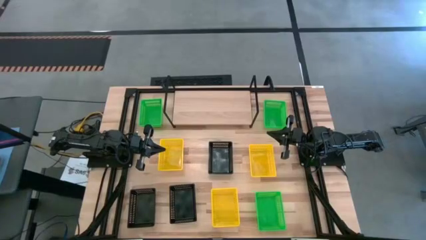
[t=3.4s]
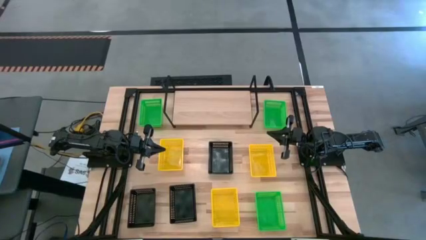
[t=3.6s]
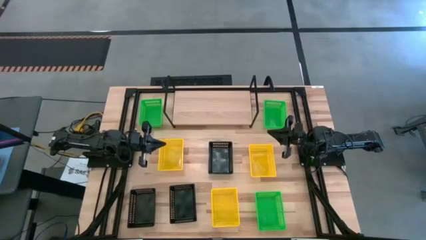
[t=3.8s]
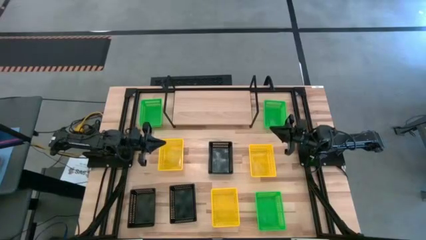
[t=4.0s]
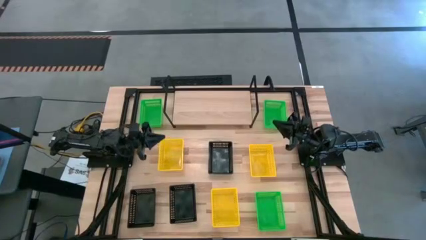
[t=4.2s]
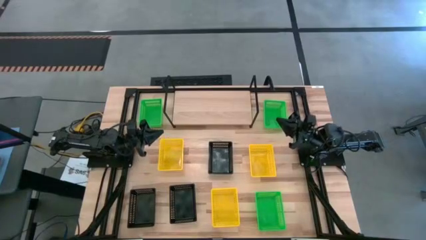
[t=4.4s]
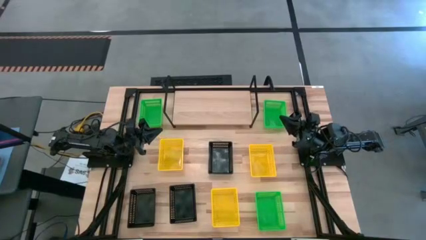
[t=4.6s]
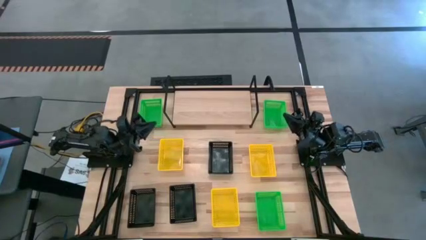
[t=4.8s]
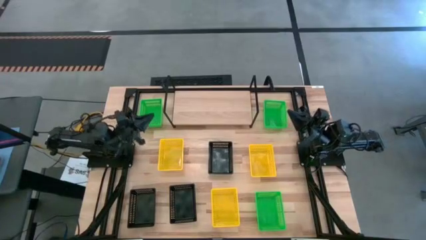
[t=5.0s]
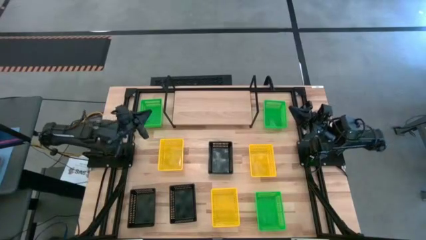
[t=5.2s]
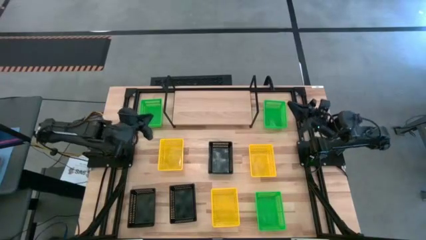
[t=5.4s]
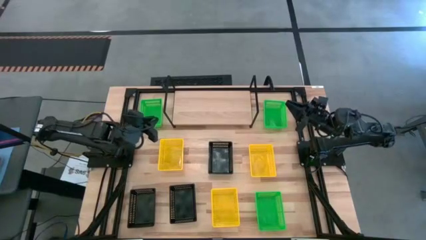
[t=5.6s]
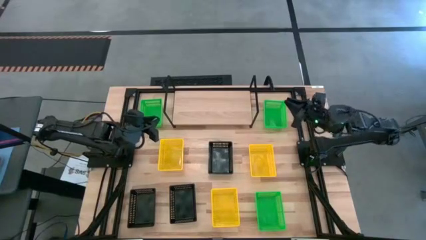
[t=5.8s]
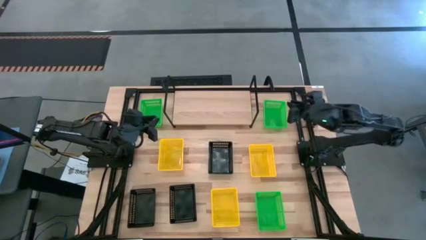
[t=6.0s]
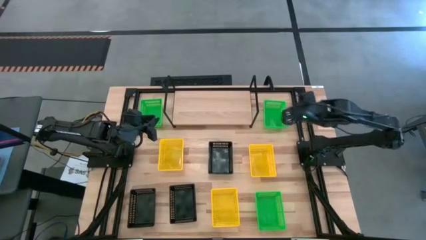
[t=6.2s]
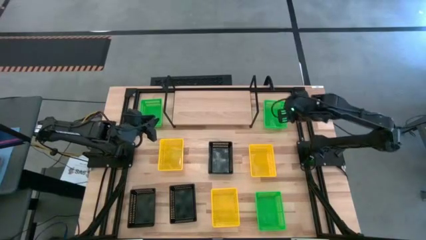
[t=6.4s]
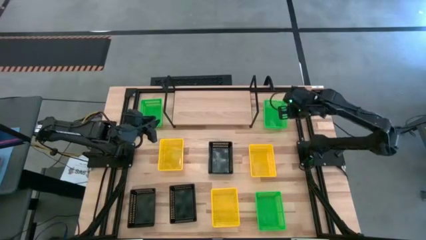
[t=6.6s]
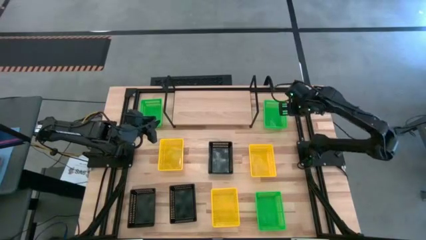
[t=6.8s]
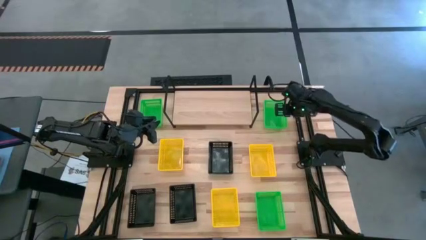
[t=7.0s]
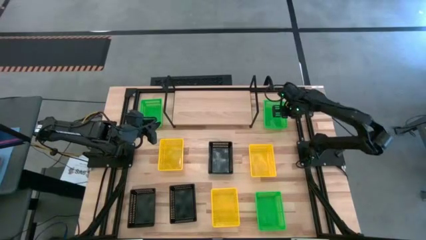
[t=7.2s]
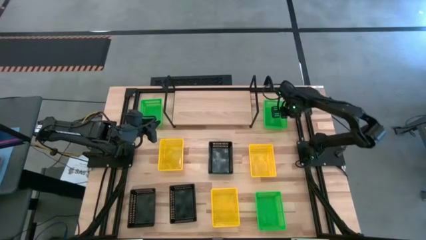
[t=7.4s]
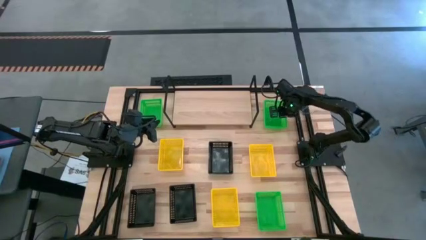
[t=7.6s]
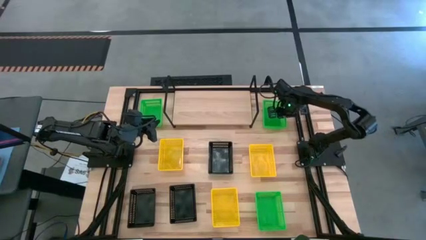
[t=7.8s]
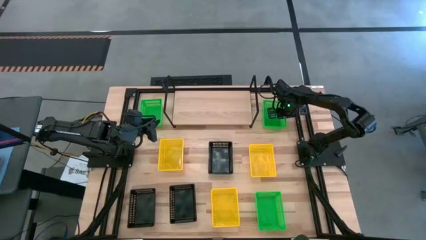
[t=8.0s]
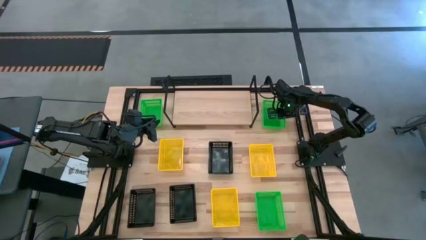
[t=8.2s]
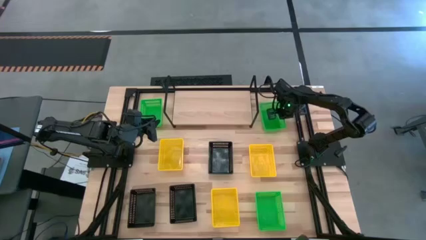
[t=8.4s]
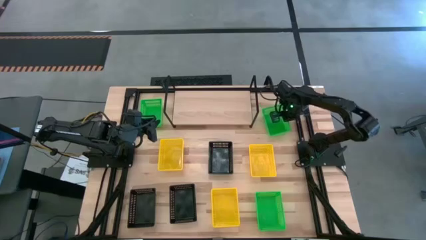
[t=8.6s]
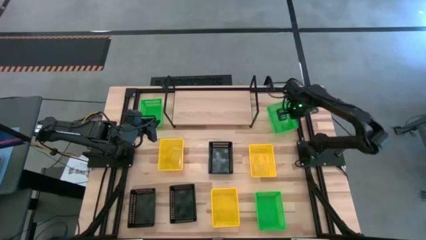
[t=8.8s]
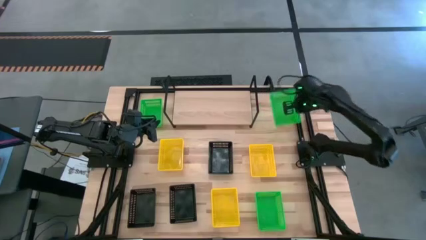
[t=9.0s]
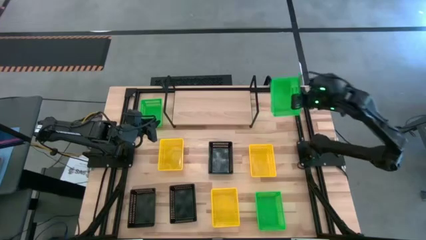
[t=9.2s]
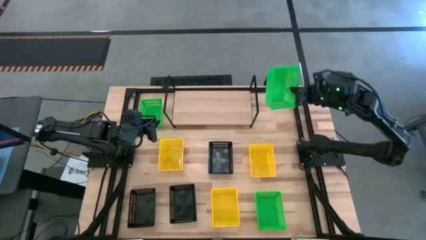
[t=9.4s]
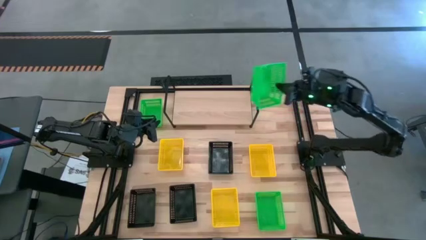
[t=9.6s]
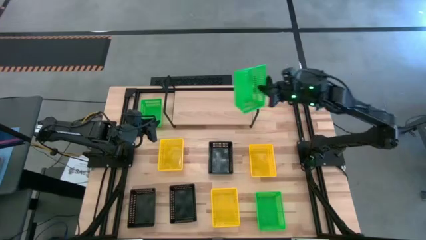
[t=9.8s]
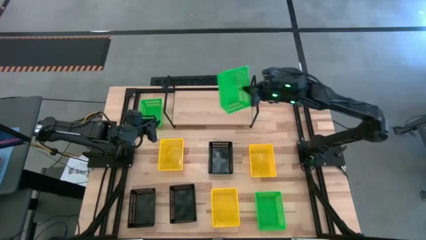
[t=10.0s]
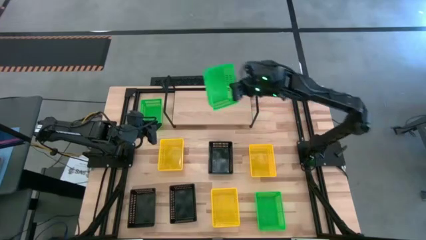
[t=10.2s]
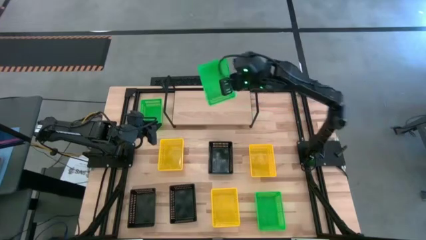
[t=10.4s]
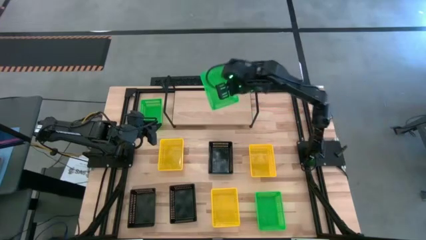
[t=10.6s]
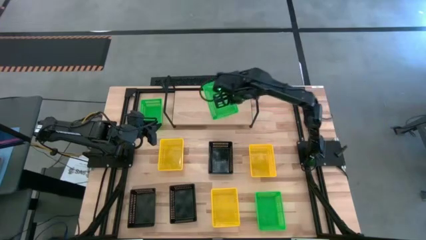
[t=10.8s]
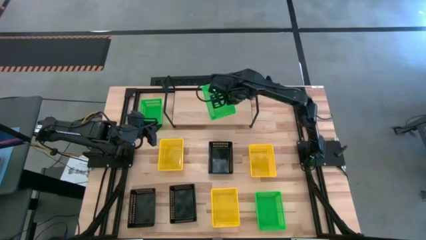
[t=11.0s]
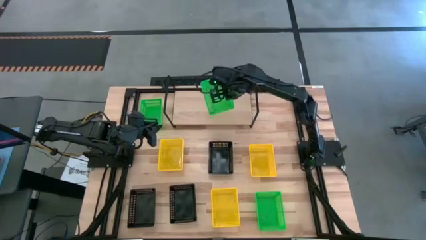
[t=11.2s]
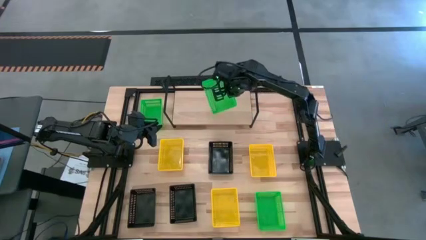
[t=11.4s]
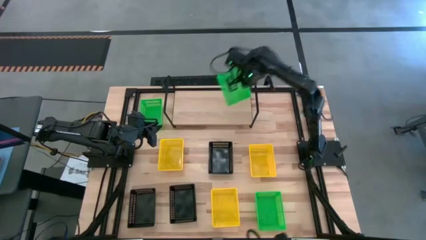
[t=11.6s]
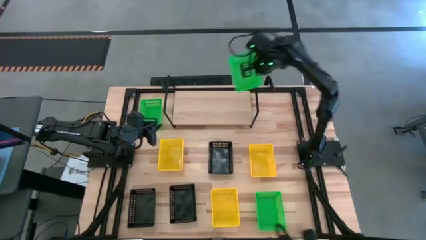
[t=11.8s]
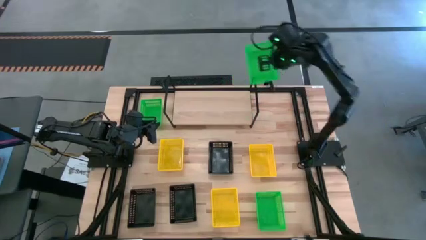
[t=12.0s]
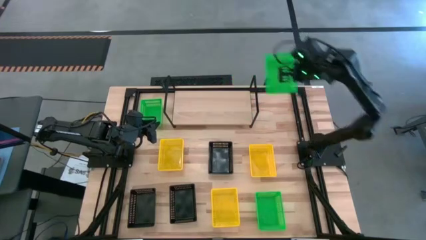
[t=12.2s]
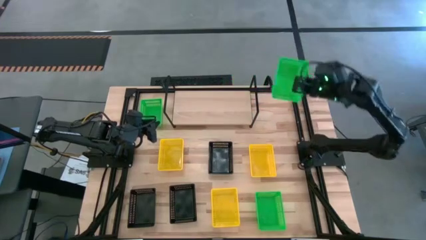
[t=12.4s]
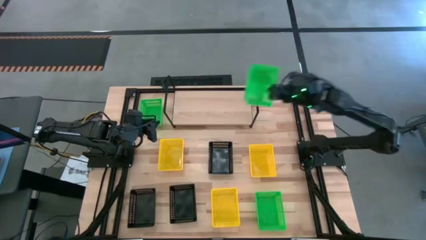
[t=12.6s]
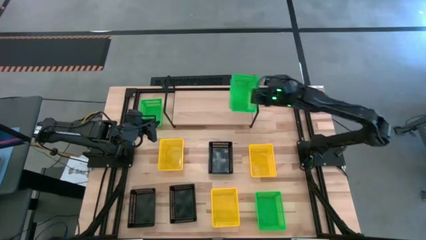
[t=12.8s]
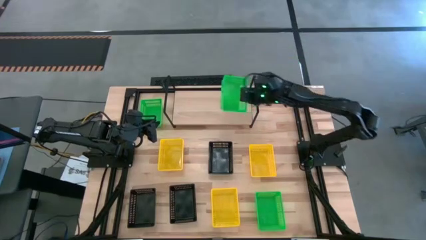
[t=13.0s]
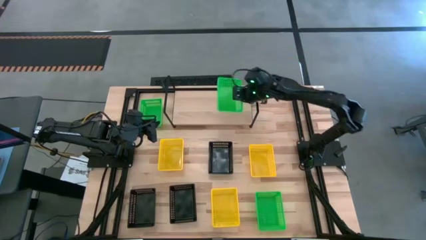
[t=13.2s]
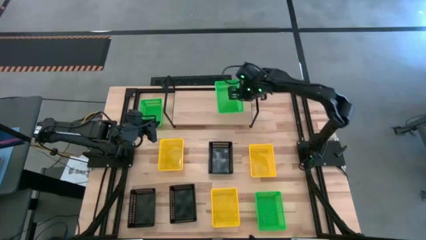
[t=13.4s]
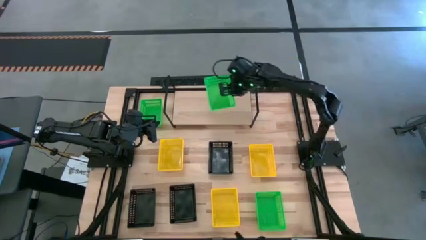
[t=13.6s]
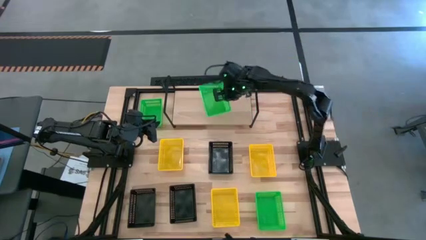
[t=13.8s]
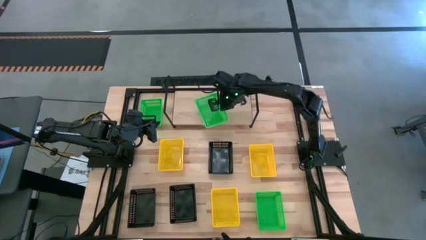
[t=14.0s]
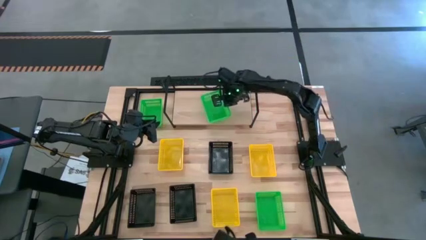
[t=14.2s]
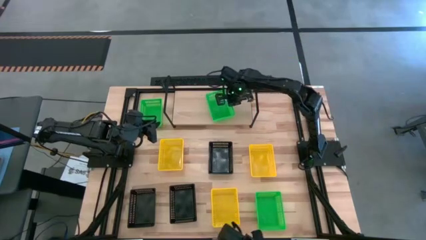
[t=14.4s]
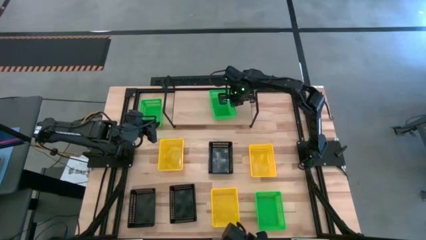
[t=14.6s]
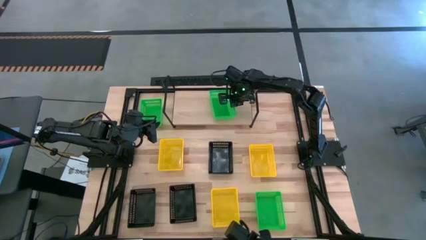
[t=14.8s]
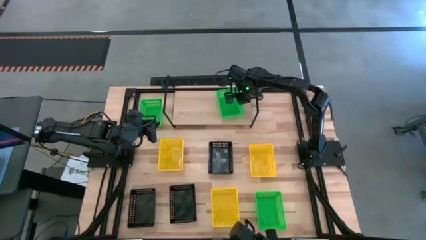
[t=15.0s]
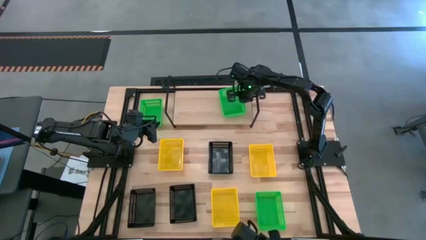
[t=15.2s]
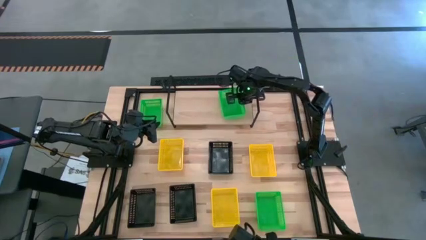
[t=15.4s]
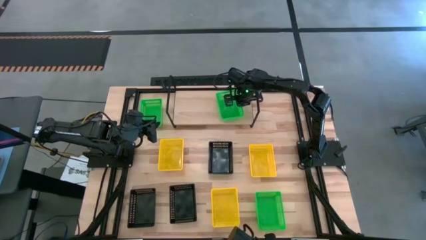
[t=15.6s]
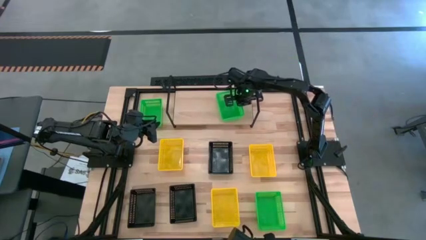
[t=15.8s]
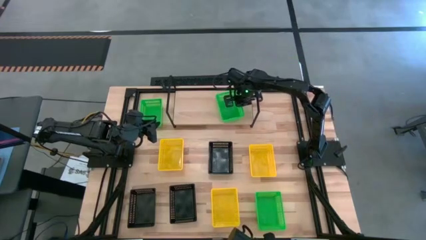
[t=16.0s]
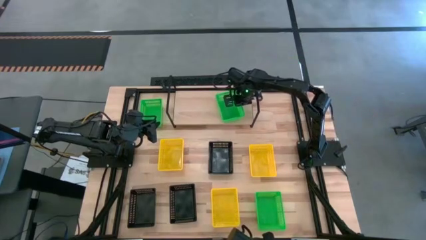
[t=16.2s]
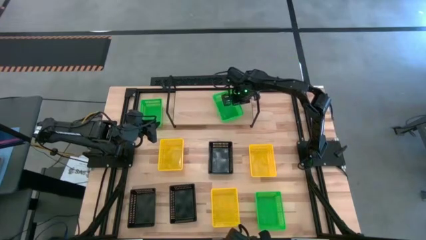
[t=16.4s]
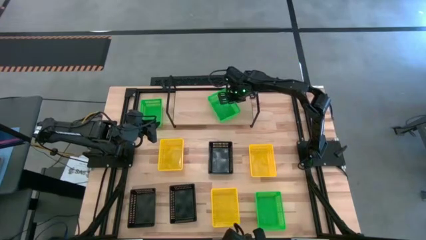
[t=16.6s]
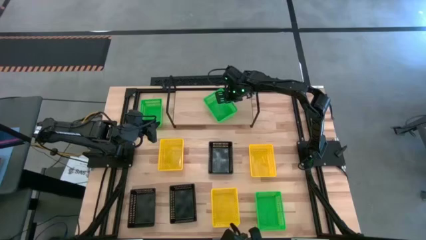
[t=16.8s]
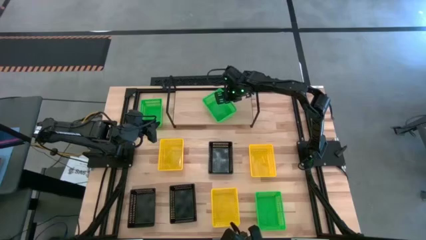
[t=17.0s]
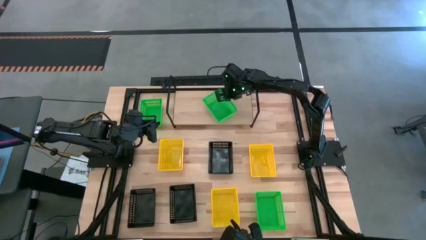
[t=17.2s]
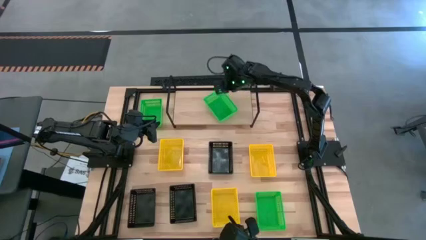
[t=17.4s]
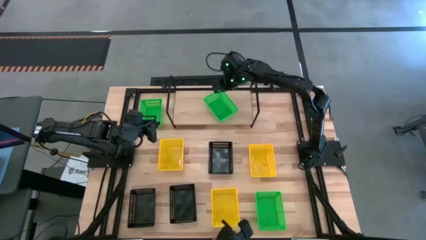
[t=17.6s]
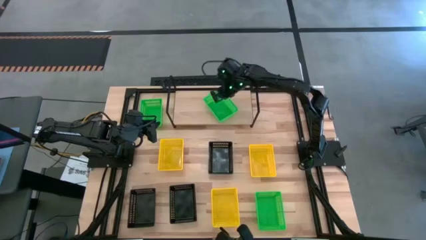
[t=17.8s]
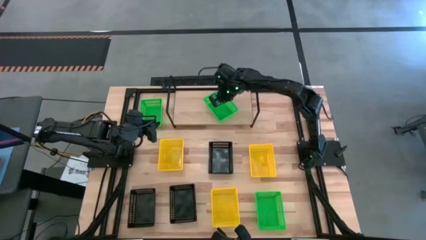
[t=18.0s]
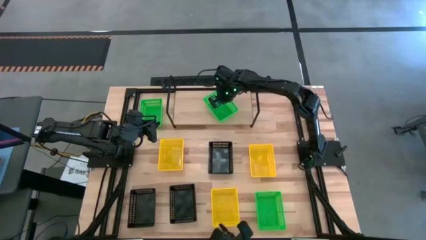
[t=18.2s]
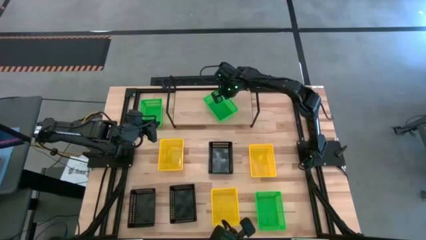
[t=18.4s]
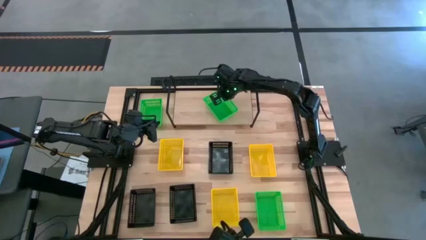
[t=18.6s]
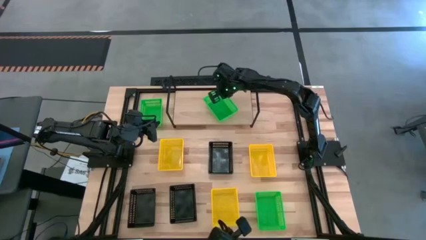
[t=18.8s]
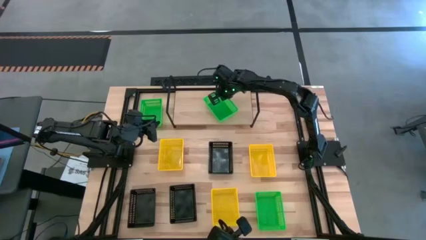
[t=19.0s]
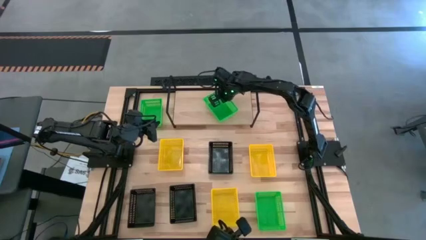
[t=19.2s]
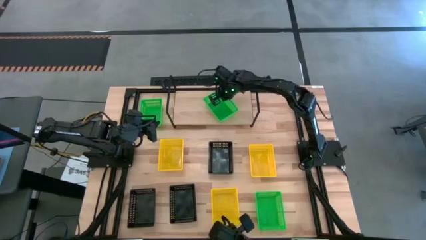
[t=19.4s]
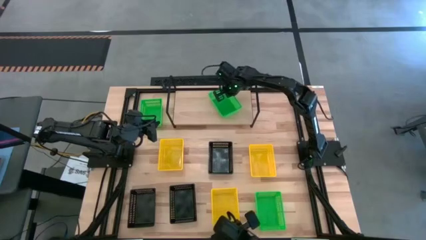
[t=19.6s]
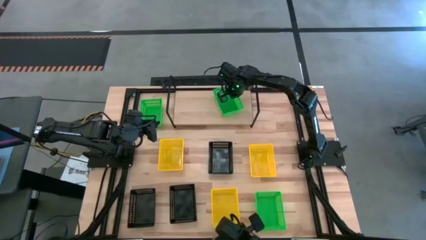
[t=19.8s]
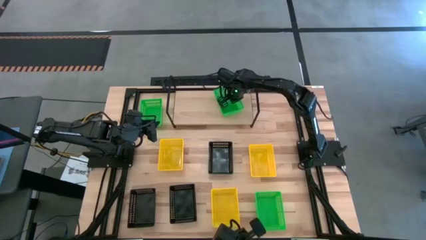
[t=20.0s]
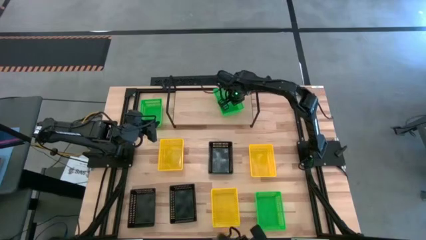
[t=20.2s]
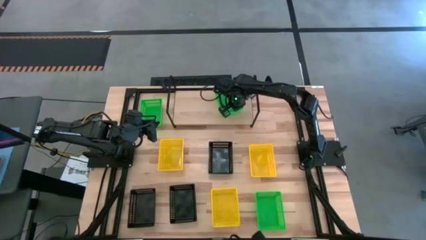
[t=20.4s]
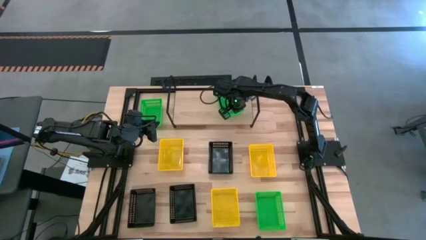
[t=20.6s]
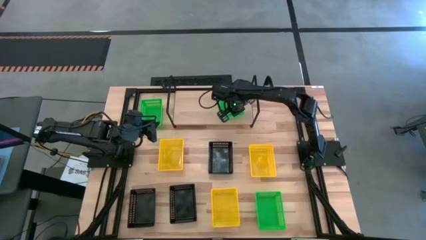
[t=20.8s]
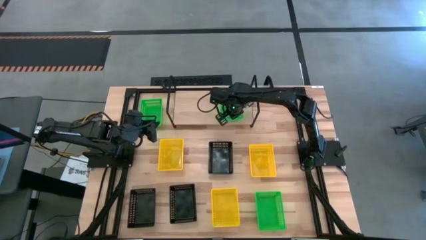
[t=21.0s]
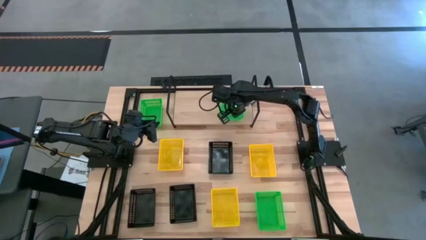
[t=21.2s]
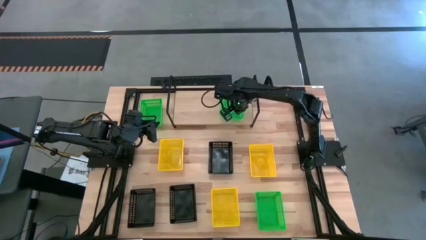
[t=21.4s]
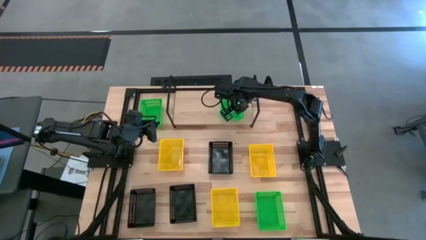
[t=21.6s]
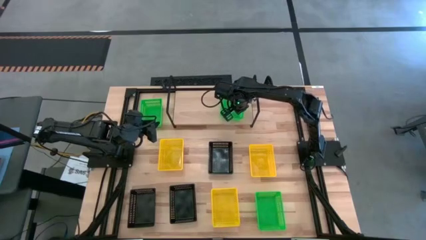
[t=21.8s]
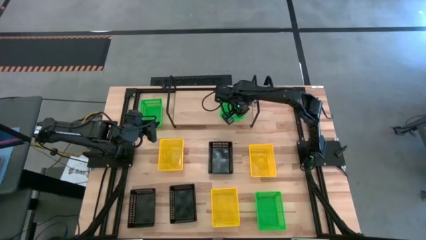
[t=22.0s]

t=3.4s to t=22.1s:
Task: Stack baskets on shelf by color
Put the top right green bin on the shelf
